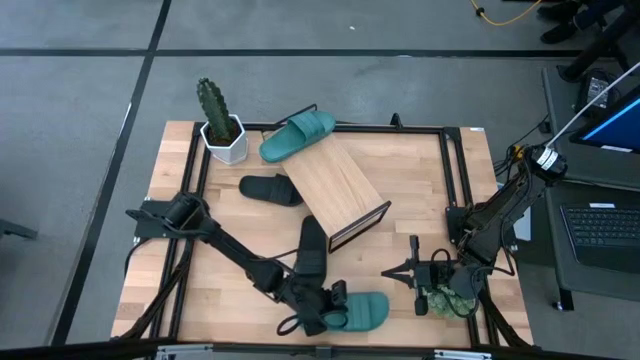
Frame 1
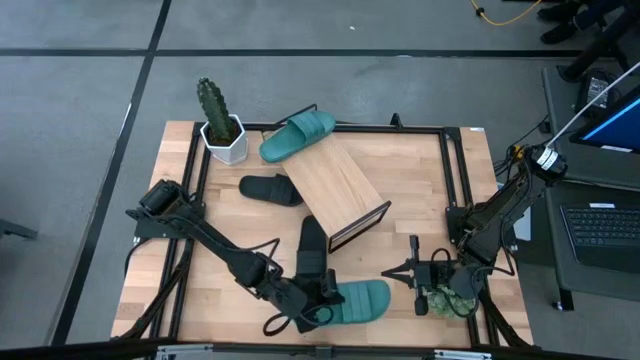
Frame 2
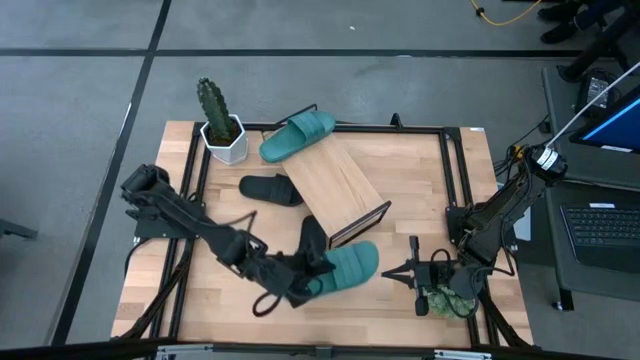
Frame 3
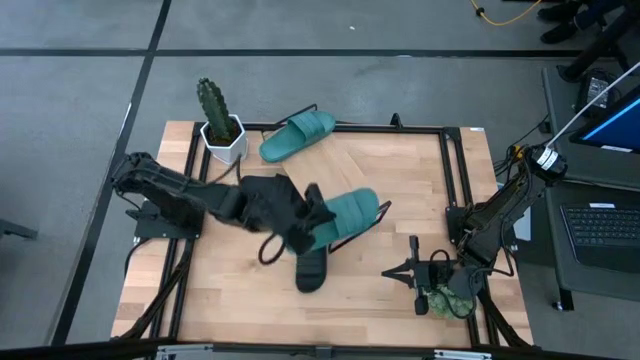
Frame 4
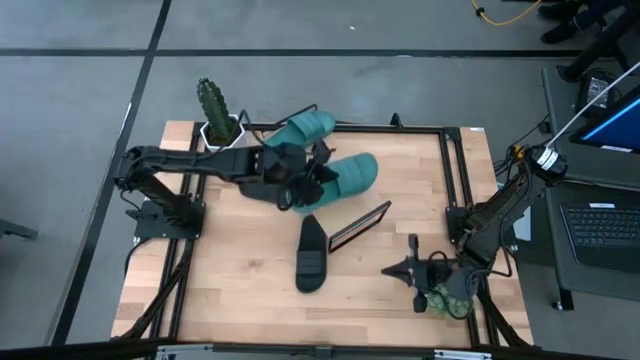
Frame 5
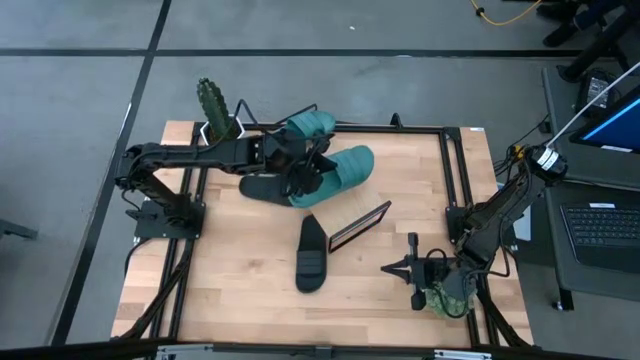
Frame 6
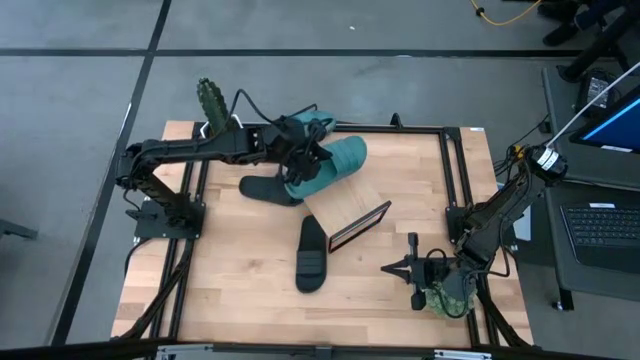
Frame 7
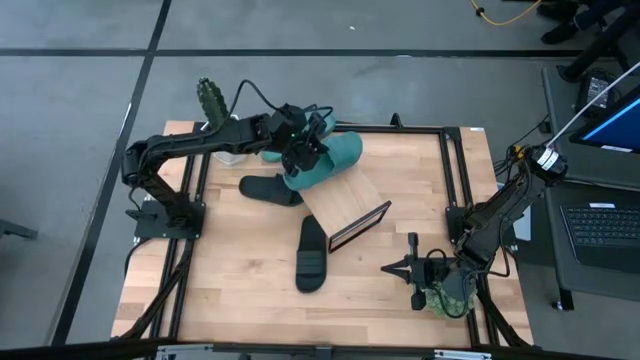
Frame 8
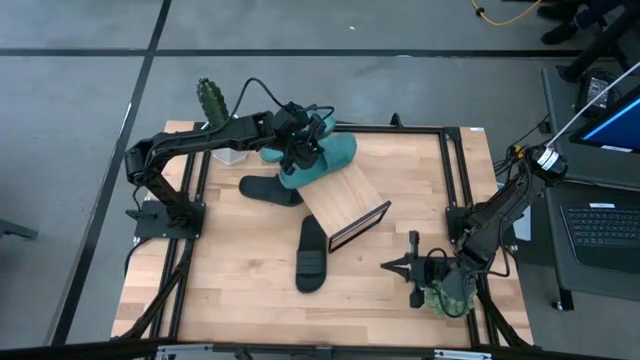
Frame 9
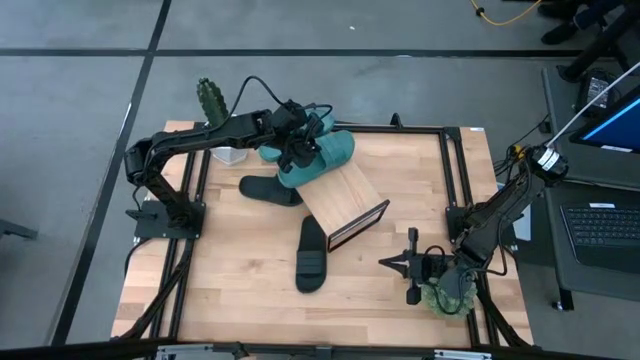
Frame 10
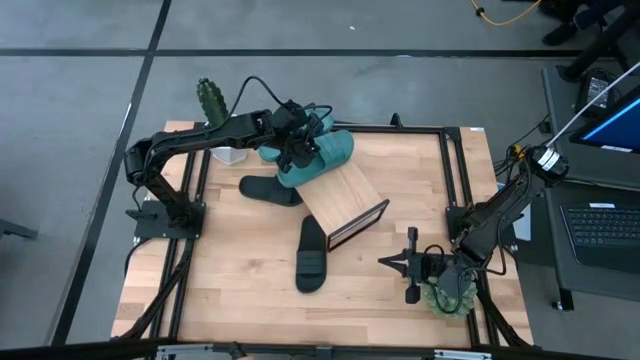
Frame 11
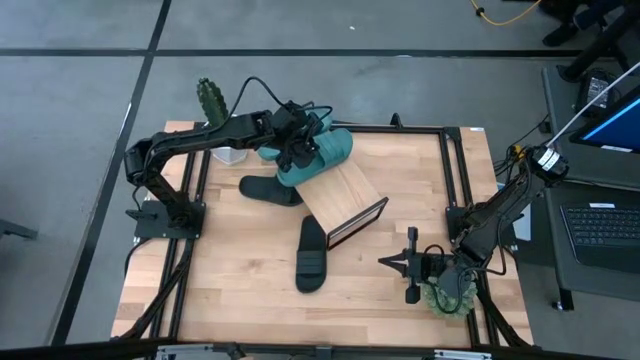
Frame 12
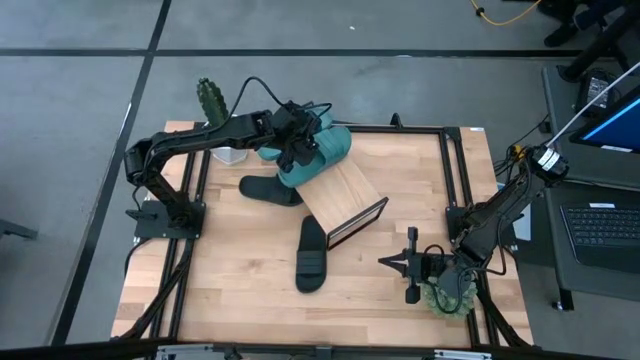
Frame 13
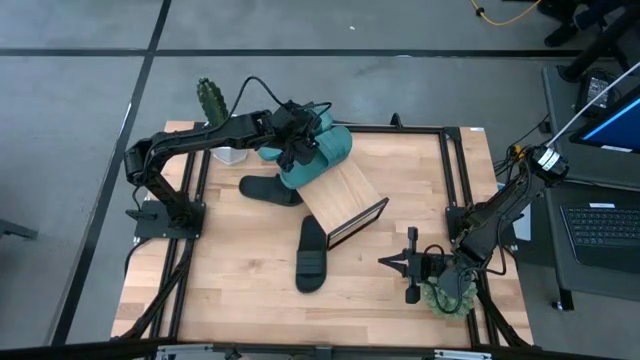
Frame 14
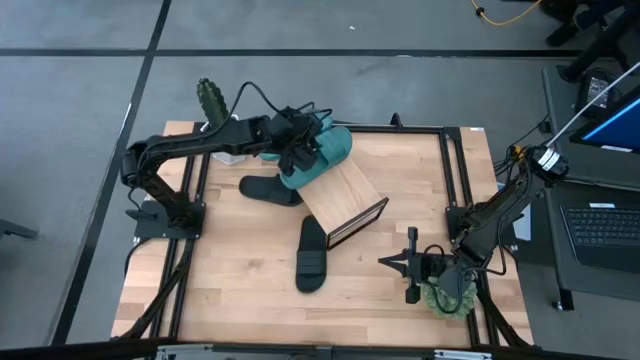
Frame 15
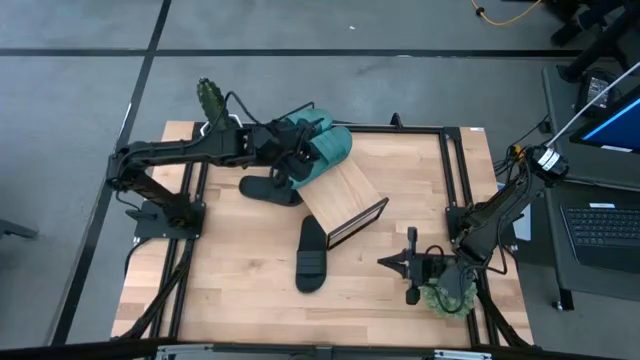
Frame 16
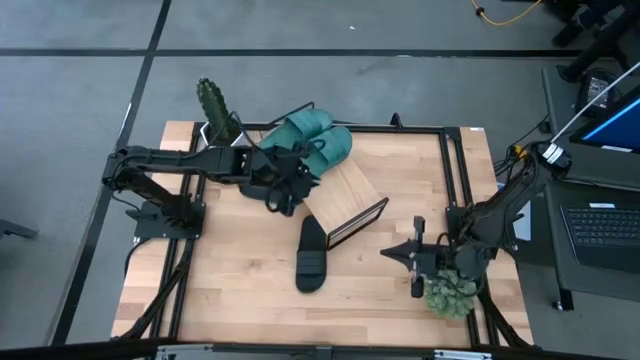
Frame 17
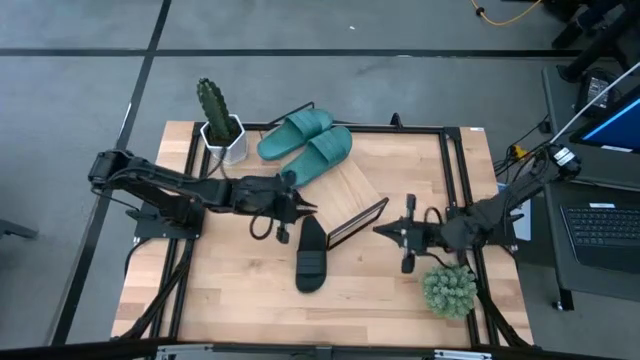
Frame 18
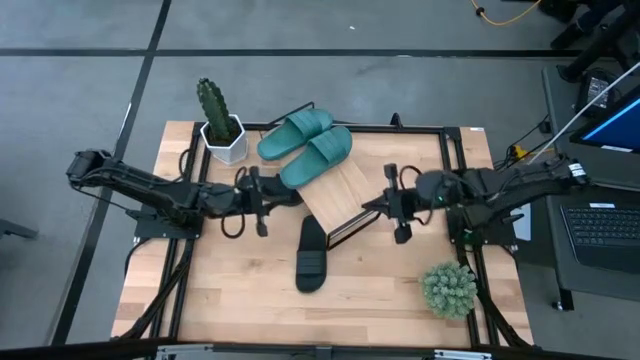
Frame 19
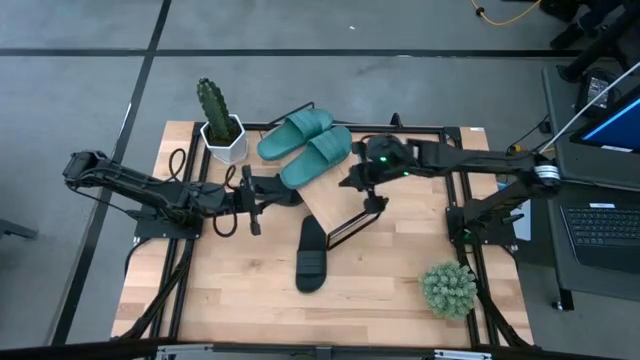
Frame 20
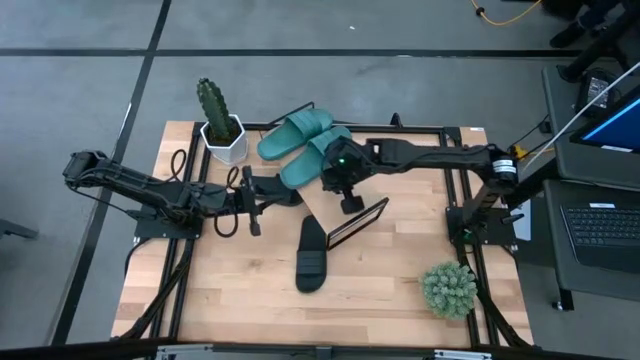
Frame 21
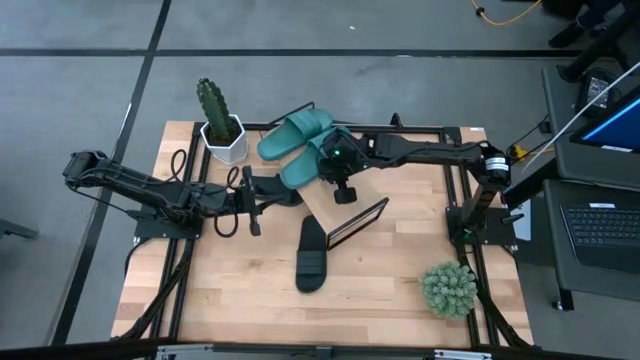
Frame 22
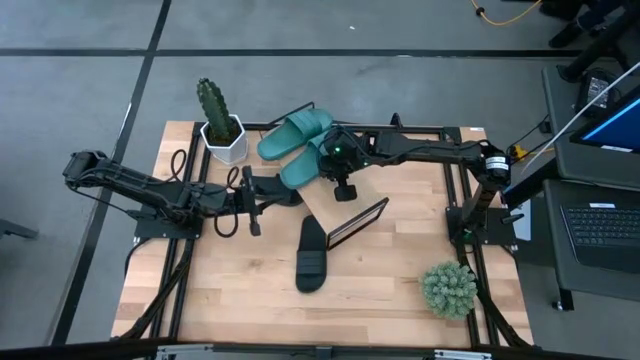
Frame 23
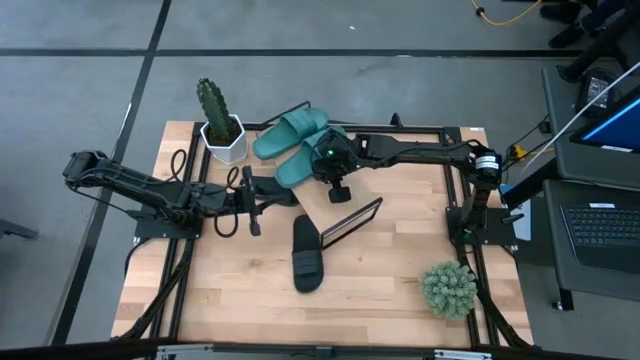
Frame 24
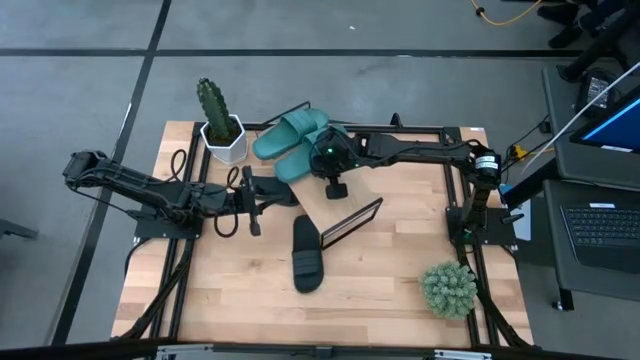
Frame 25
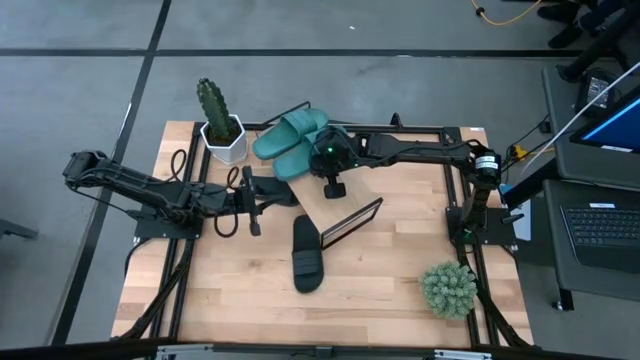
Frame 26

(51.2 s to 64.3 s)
Task: Pick and place slides into the shelf
Put the green slipper onto the shelf

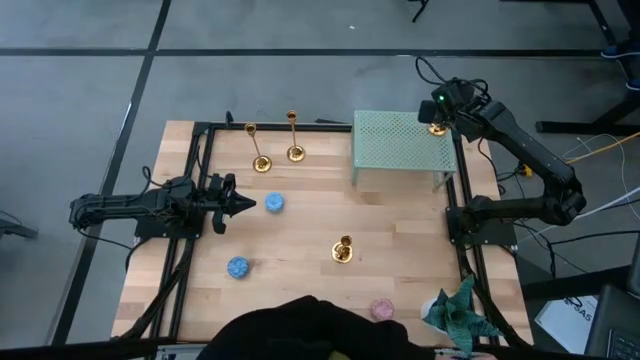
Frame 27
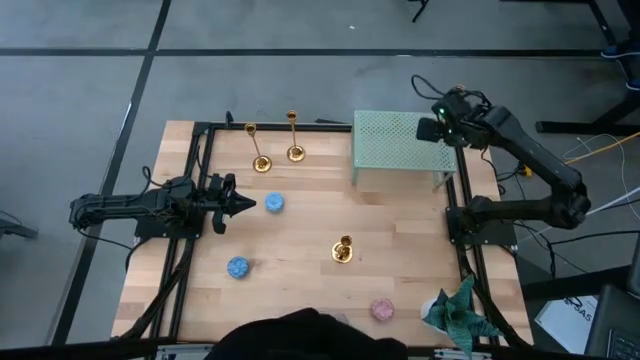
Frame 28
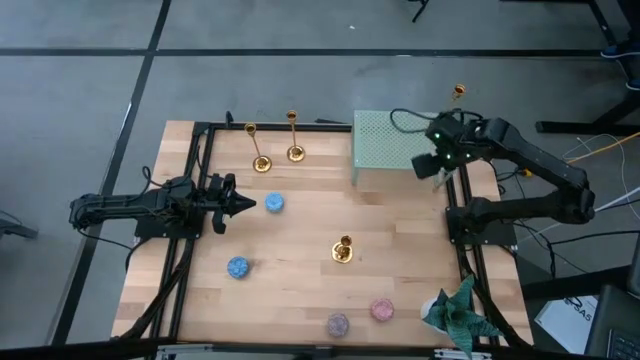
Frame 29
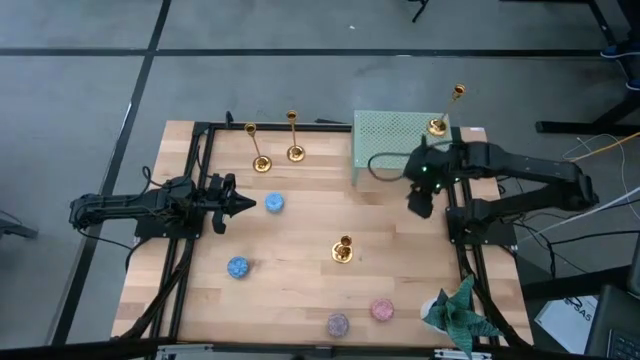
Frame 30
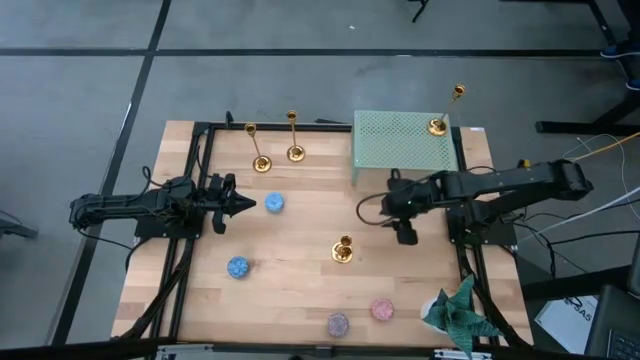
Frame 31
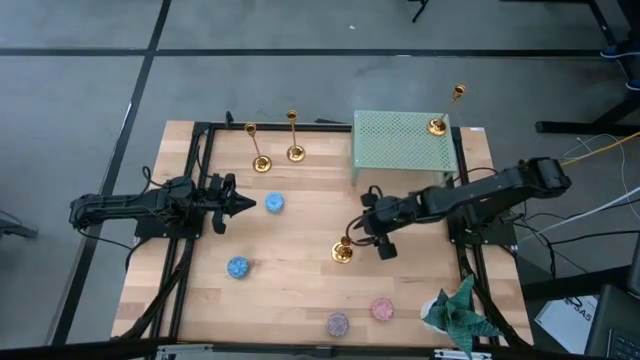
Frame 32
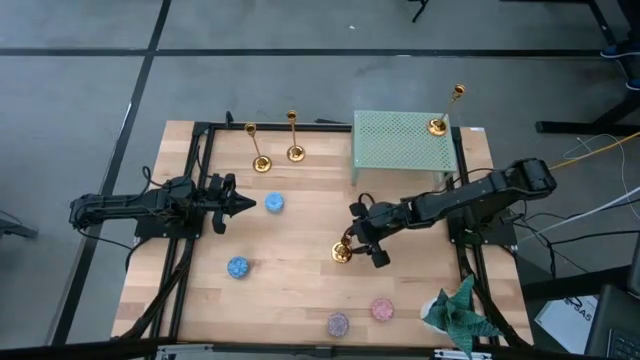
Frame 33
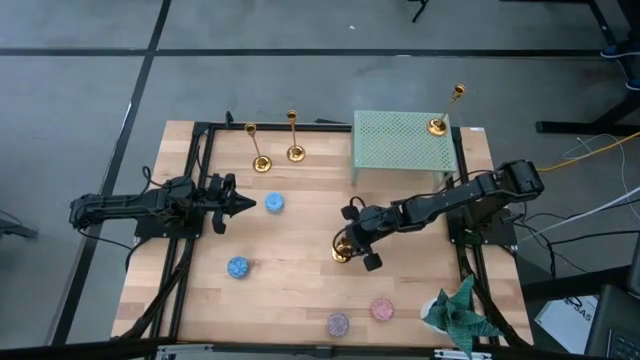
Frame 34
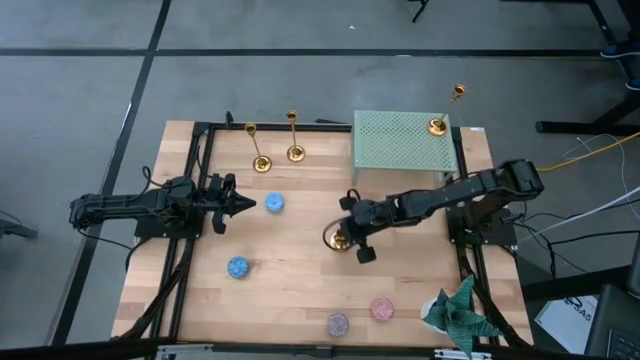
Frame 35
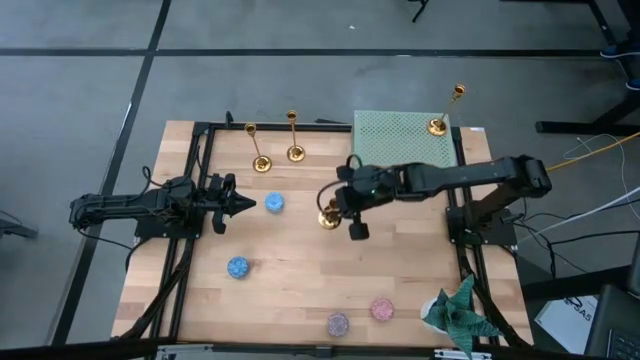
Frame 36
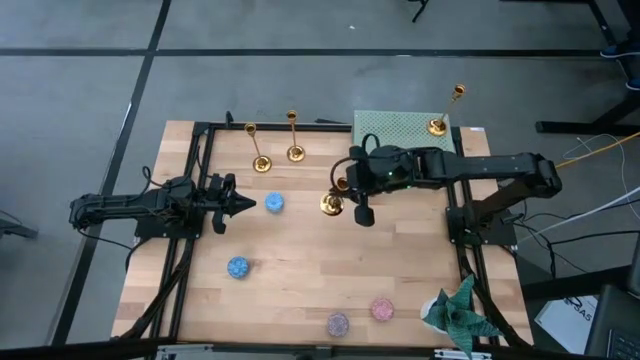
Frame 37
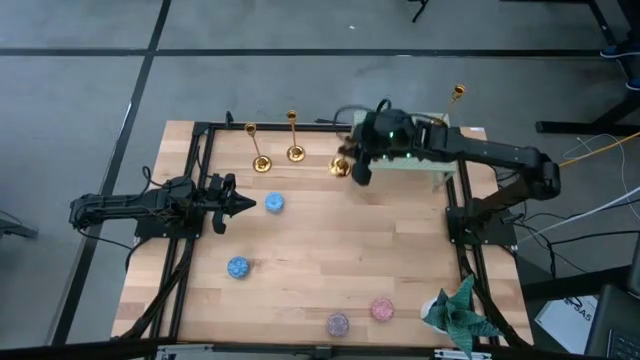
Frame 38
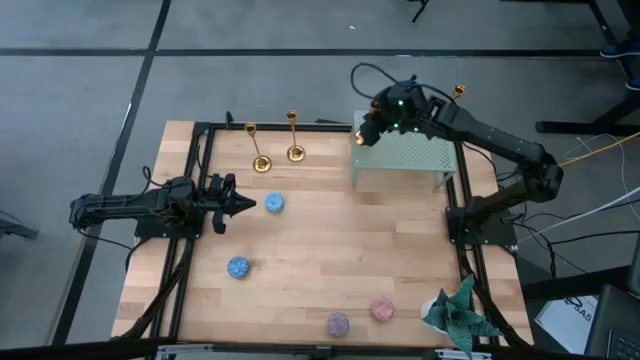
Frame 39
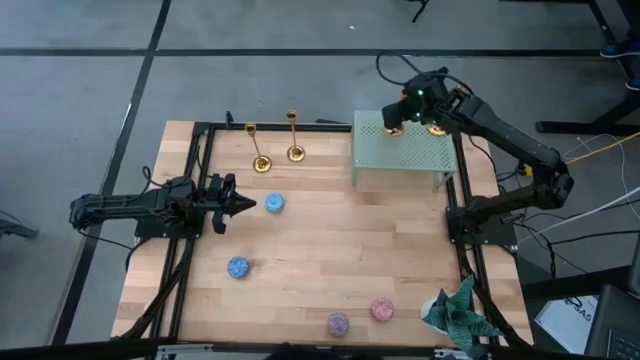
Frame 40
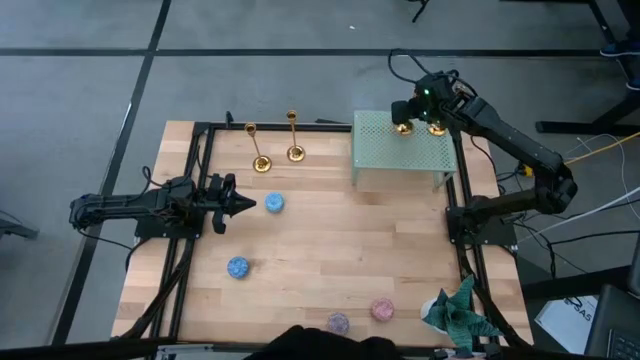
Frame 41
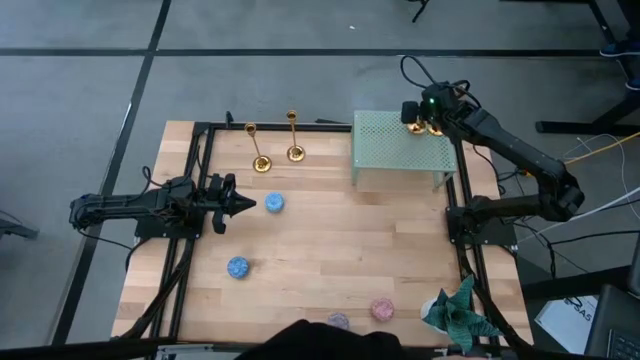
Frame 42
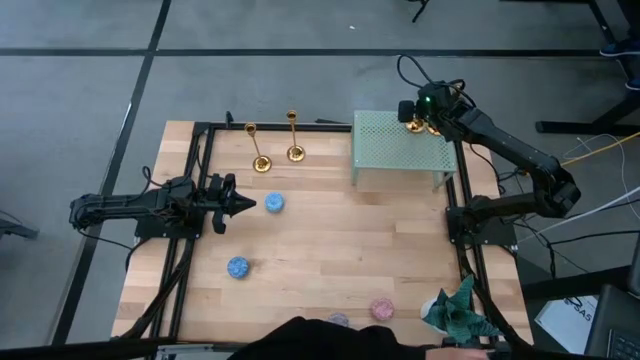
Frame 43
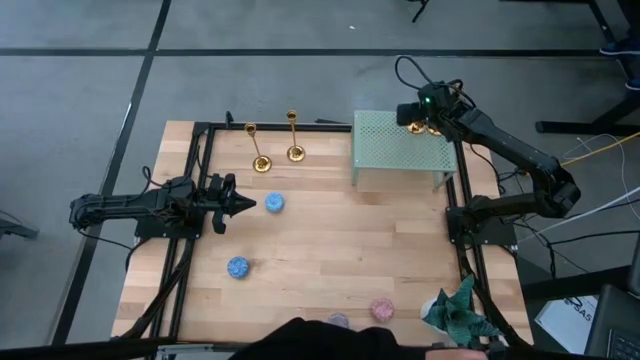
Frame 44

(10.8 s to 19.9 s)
Task: Pick & Place candle stick holders
Put the gold candle holder on the shelf
